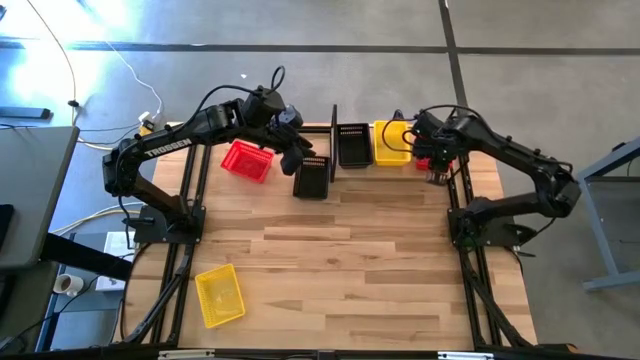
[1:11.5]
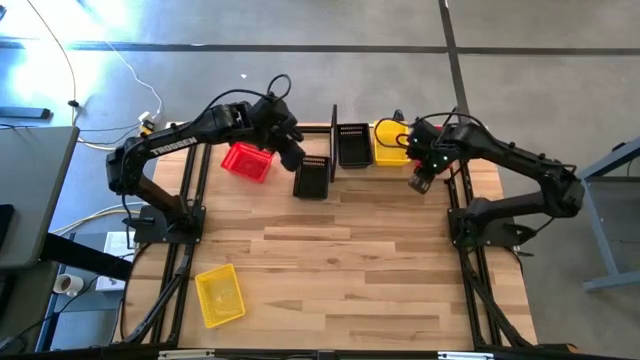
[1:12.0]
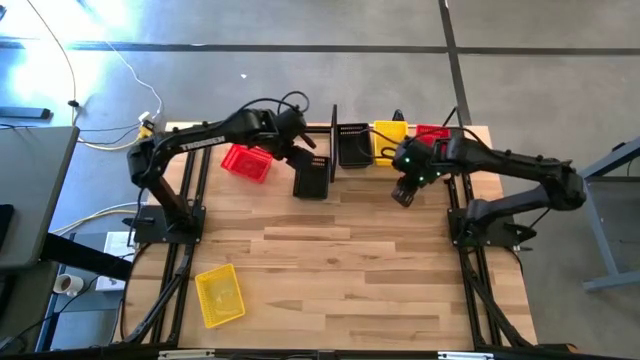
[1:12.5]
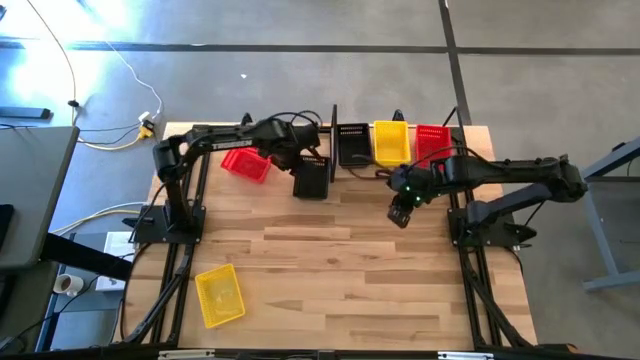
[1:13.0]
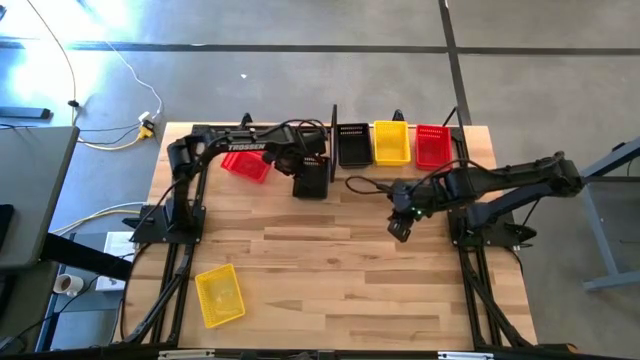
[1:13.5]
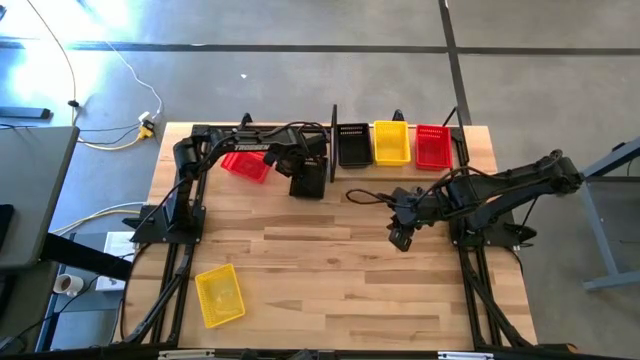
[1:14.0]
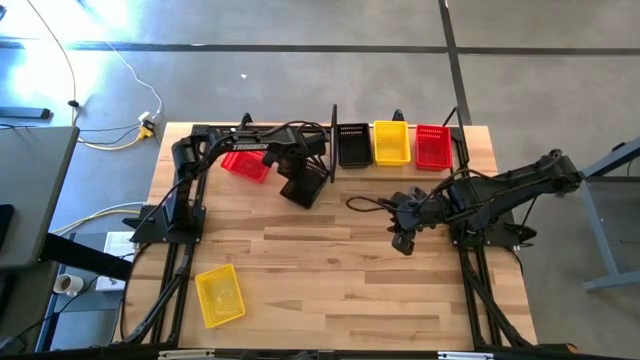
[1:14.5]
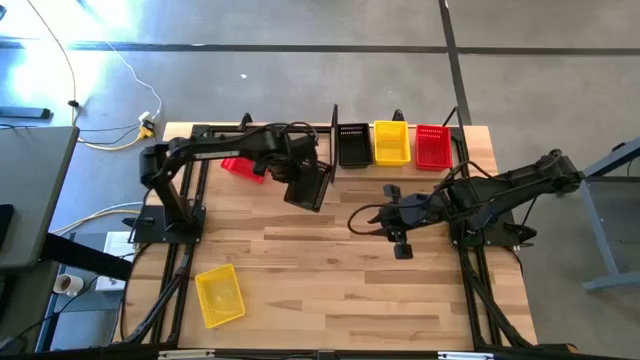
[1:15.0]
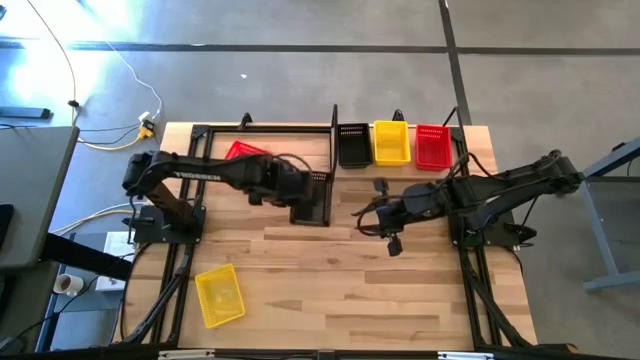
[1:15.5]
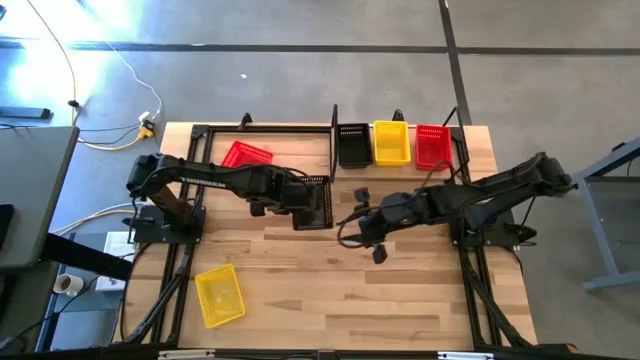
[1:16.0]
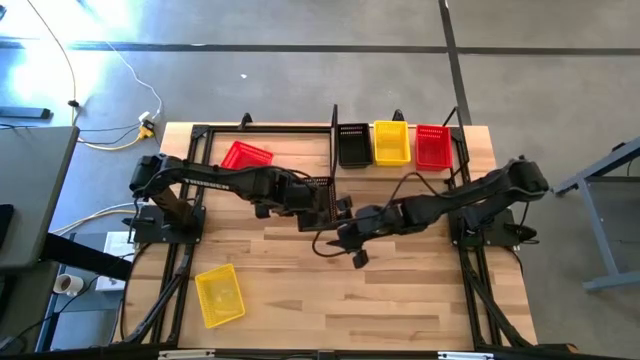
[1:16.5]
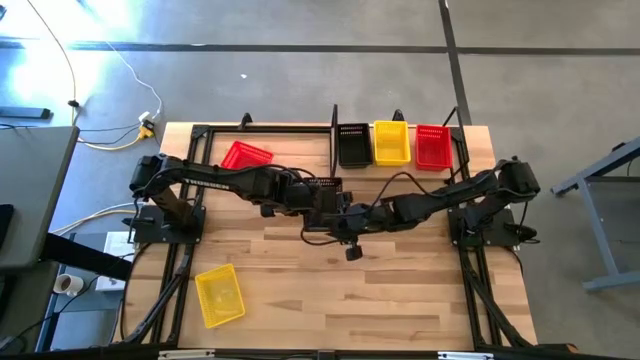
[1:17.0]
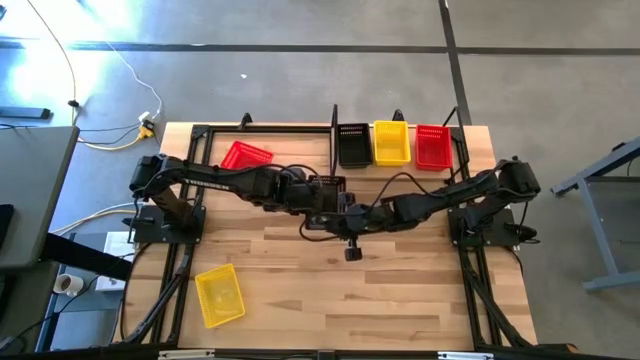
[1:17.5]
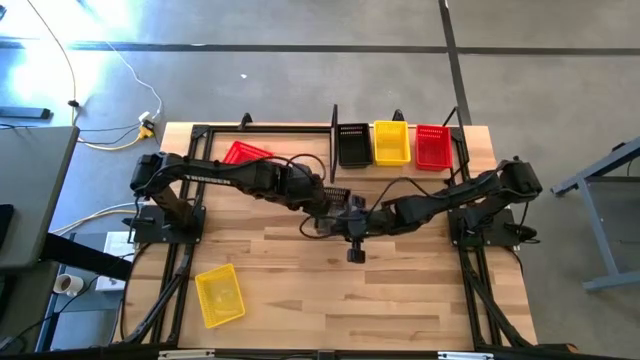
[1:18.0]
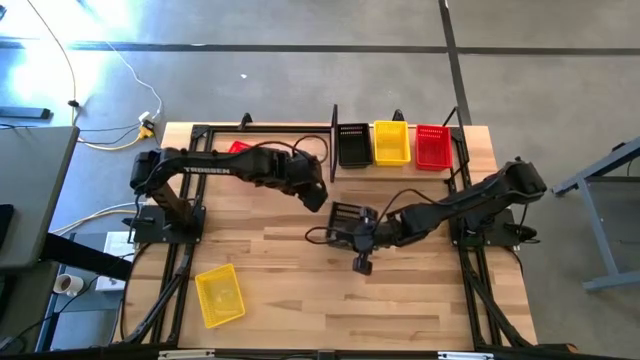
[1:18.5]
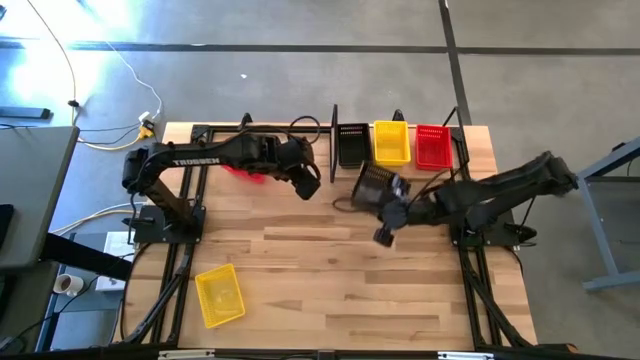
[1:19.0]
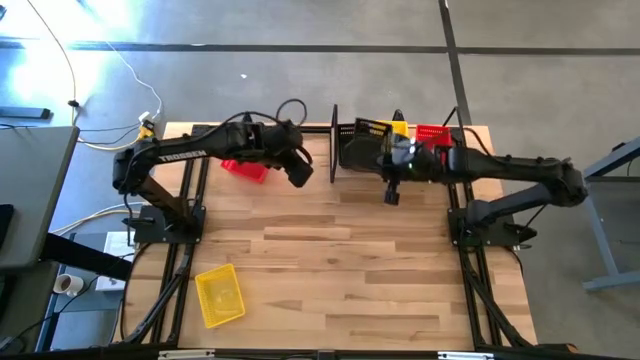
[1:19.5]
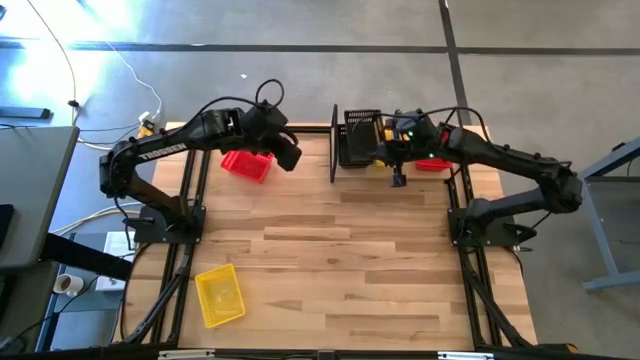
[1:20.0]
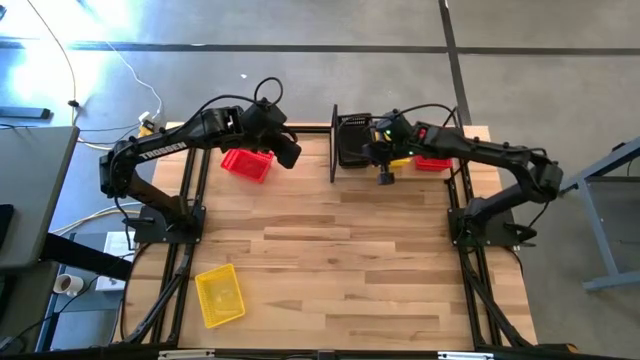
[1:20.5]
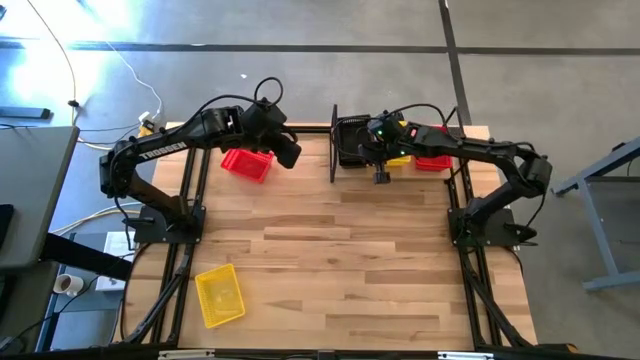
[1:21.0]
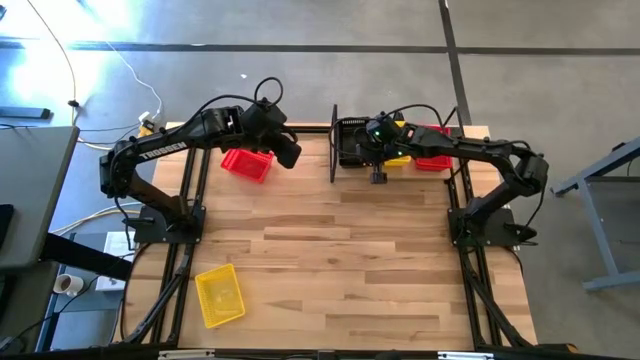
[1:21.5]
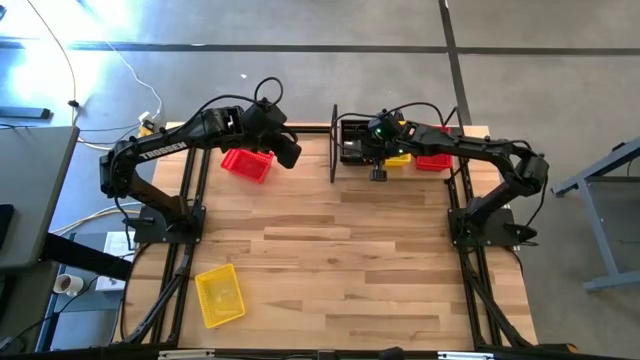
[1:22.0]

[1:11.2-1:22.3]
Task: Stack baskets on shelf by color
Stack the black basket on the black basket on the shelf

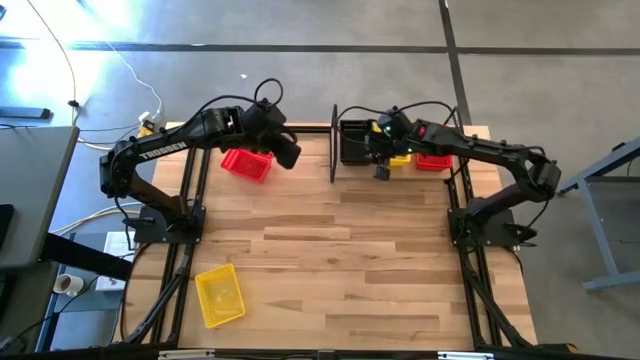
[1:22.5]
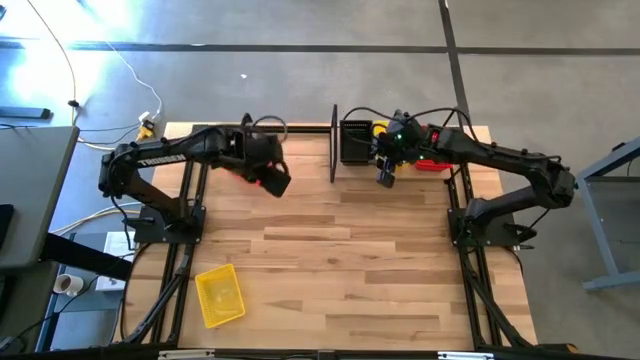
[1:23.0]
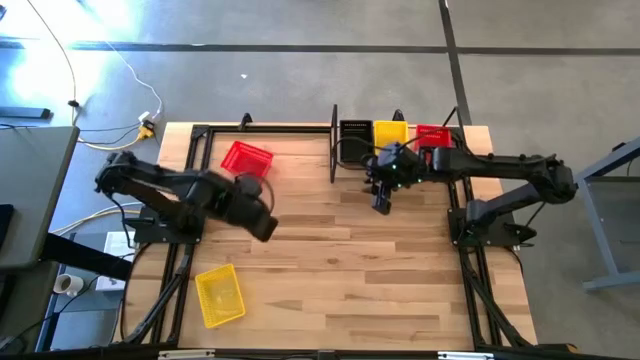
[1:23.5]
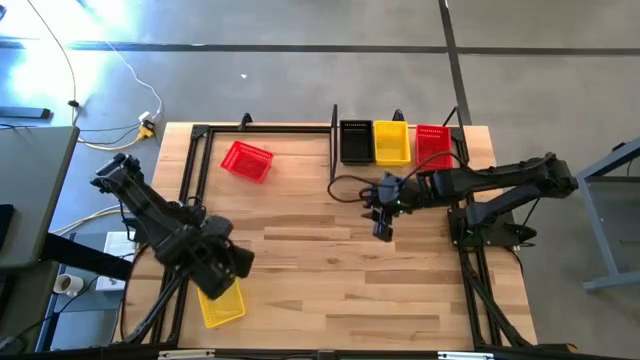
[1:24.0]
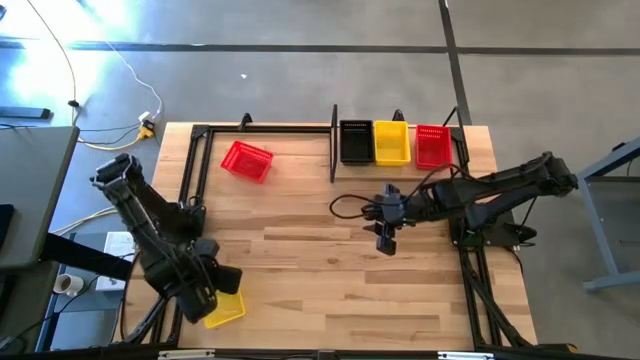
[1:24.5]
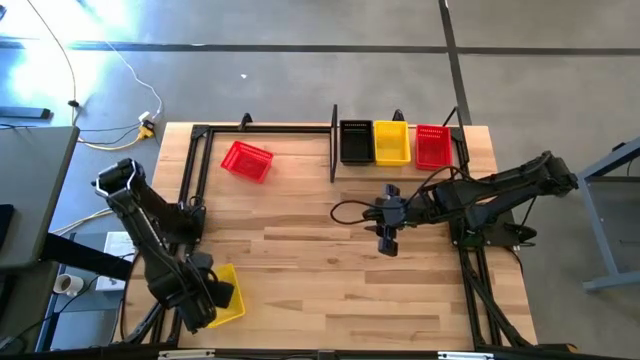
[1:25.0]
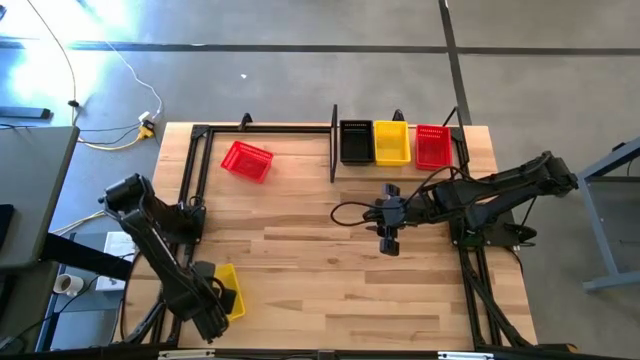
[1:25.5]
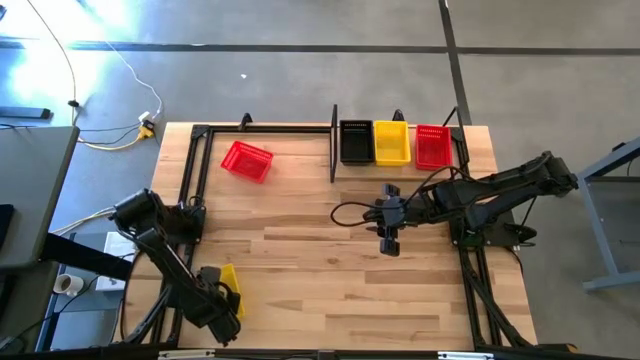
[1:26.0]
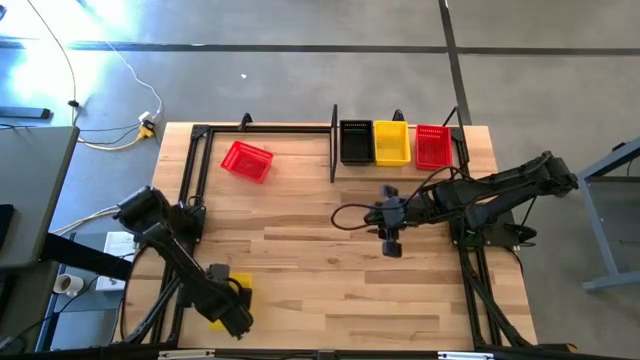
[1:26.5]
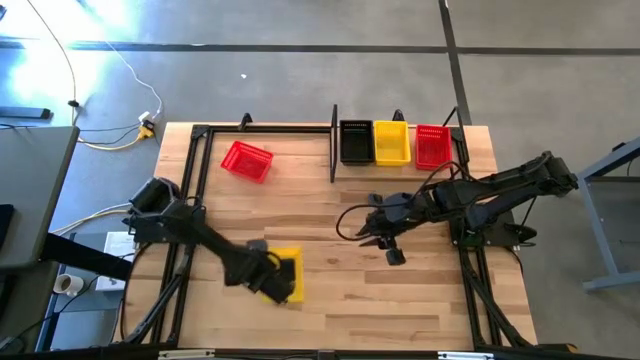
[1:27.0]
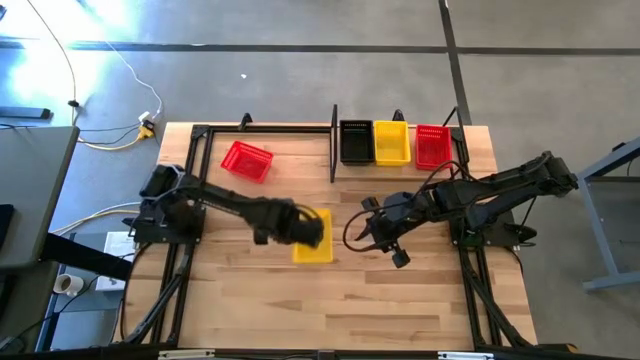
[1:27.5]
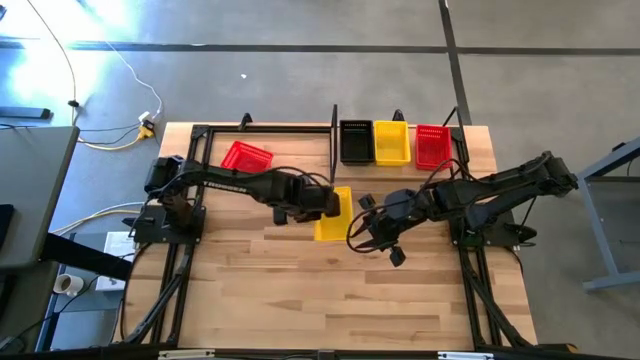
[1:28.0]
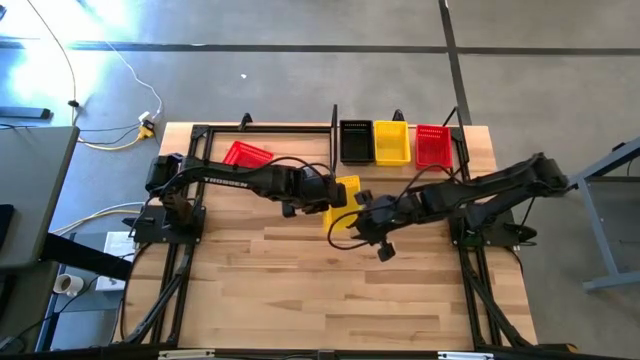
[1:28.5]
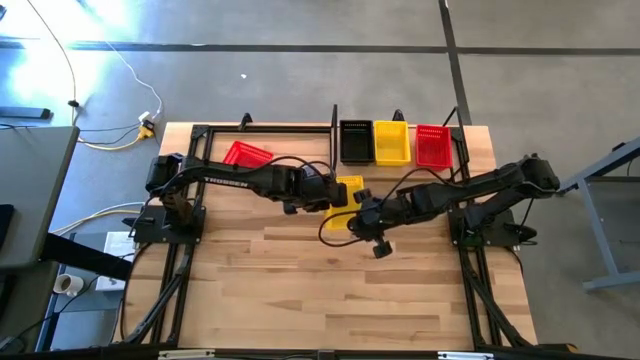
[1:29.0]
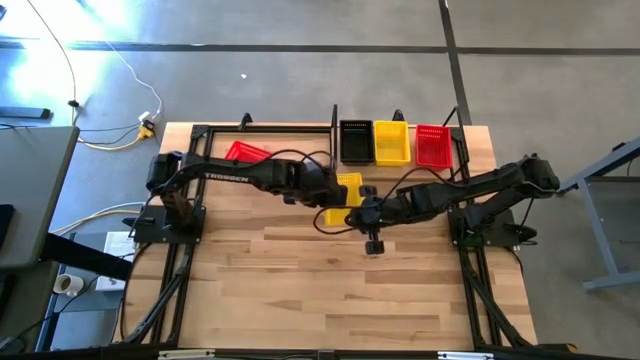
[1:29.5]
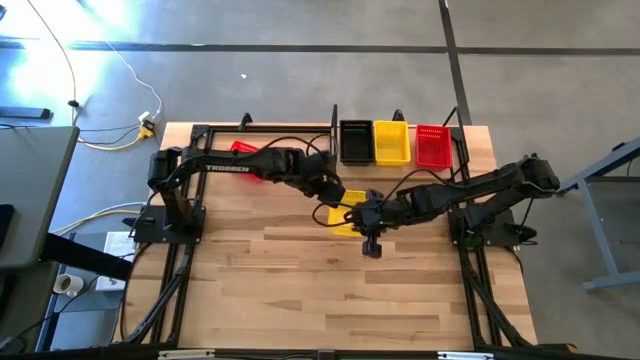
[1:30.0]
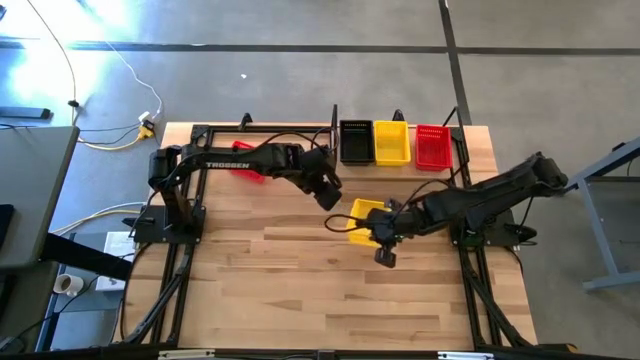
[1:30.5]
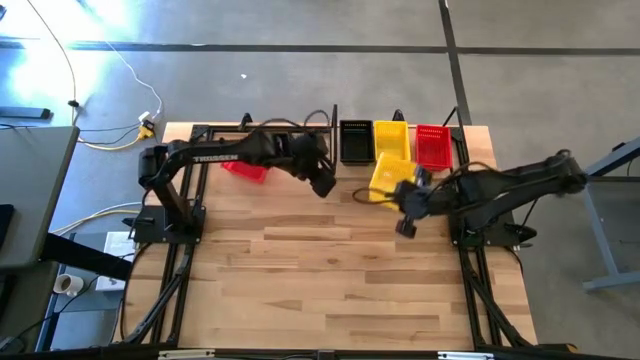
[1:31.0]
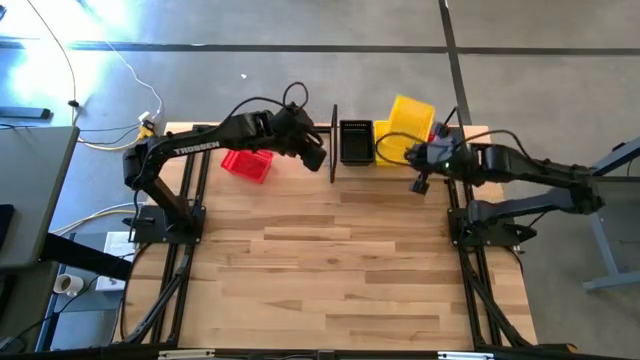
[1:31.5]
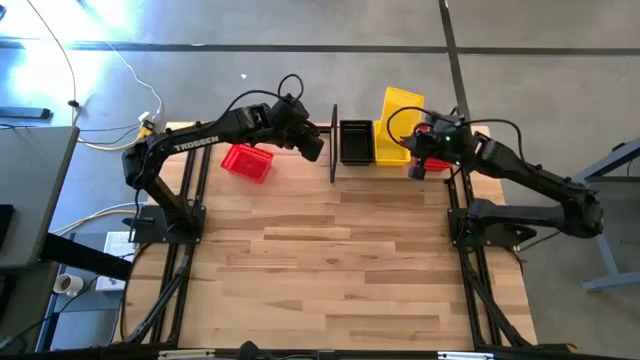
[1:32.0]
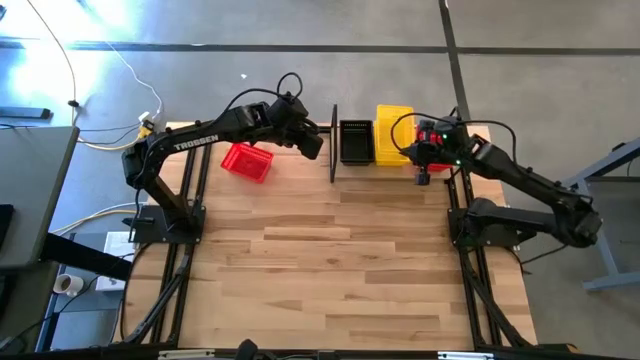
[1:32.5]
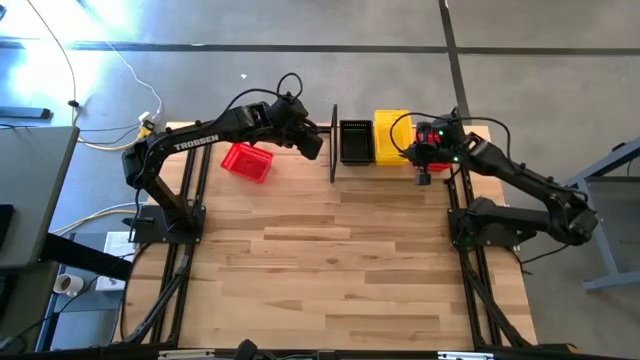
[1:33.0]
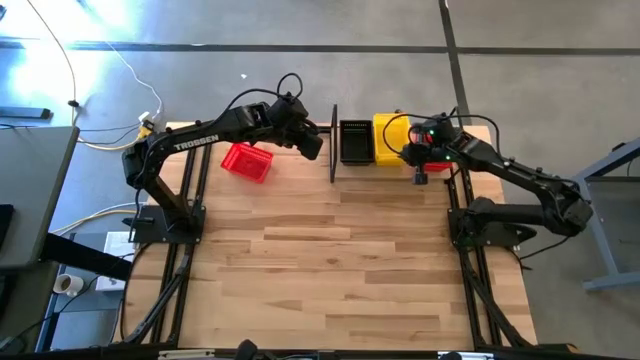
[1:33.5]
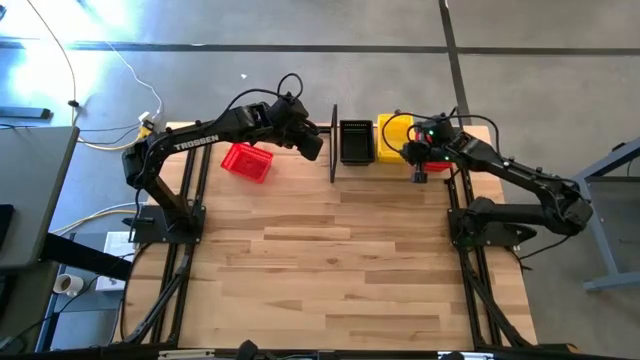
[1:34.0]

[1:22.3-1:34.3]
Stack the yellow basket on the yellow basket on the shelf
